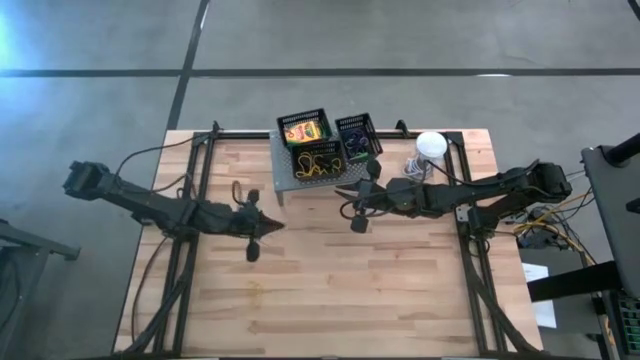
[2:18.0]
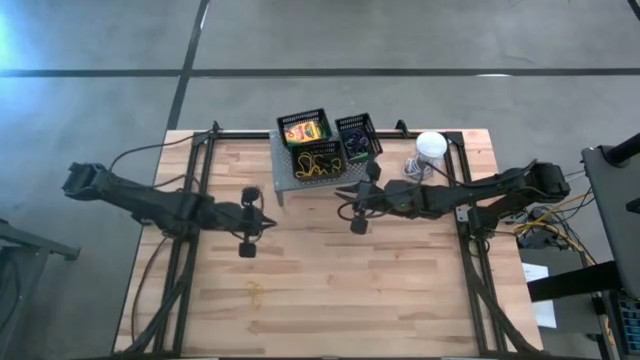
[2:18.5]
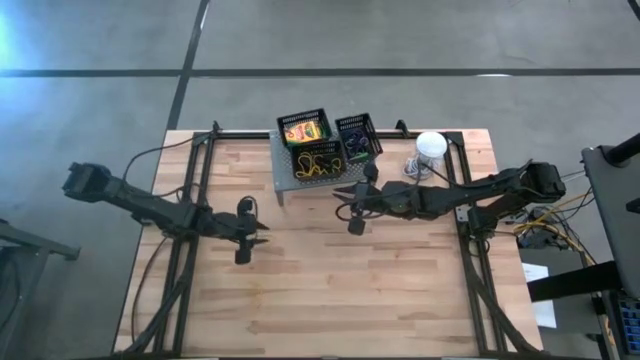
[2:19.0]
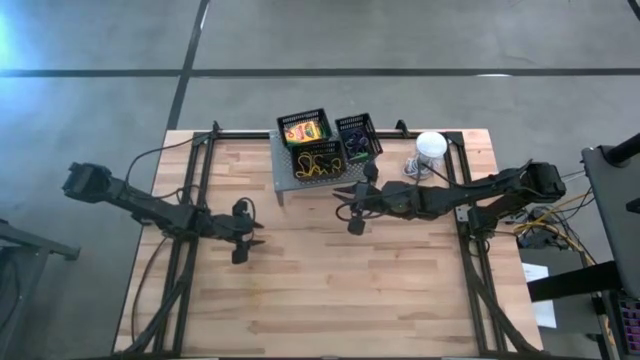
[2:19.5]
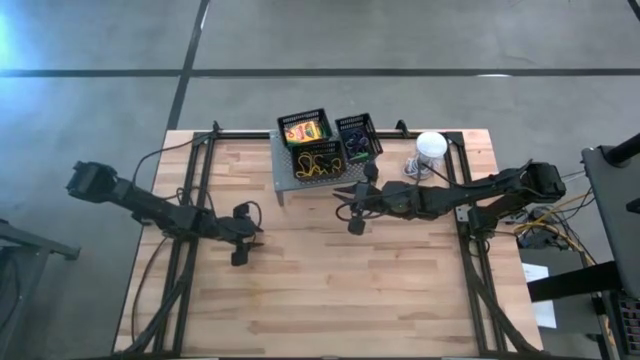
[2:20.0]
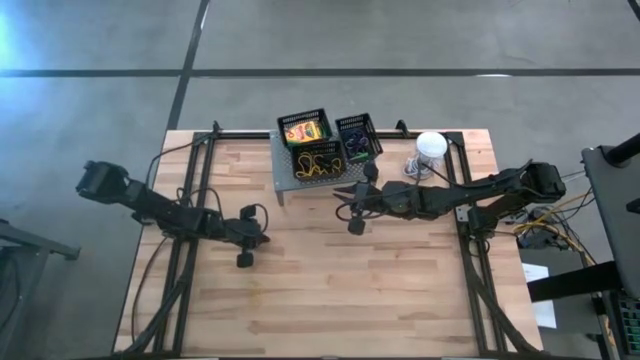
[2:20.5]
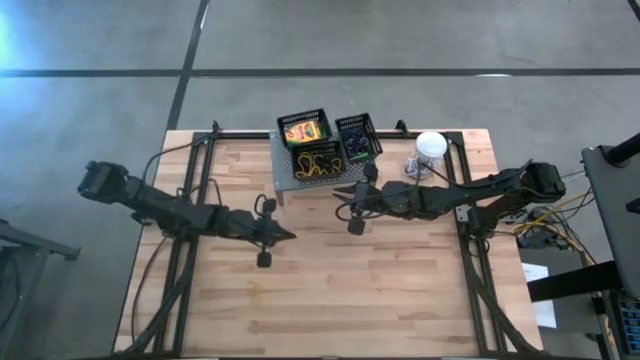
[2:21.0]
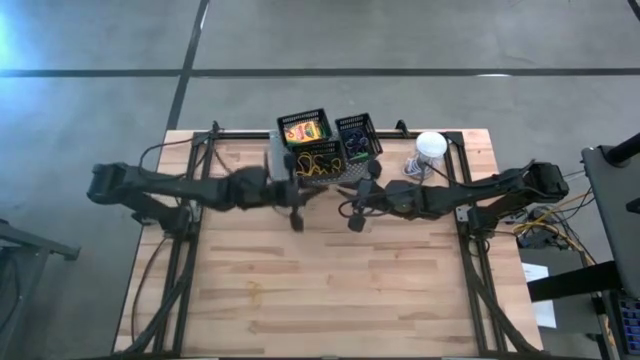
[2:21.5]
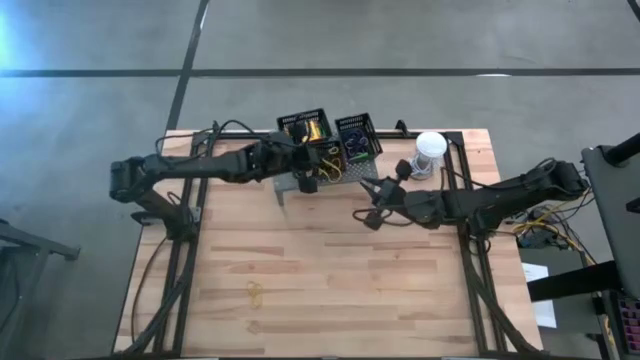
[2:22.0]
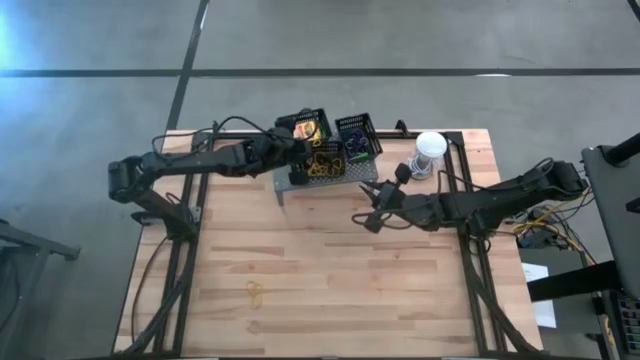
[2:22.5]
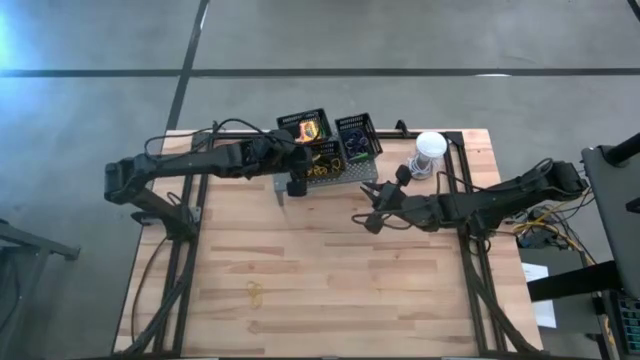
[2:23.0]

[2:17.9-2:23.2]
Task: Pick & Place Office Desk Supplies
Put the yellow rubber band into the bottom left black bin

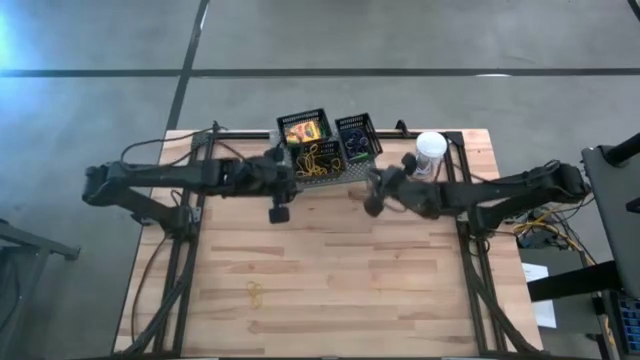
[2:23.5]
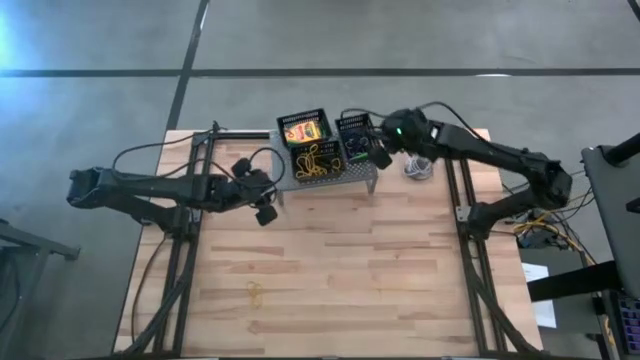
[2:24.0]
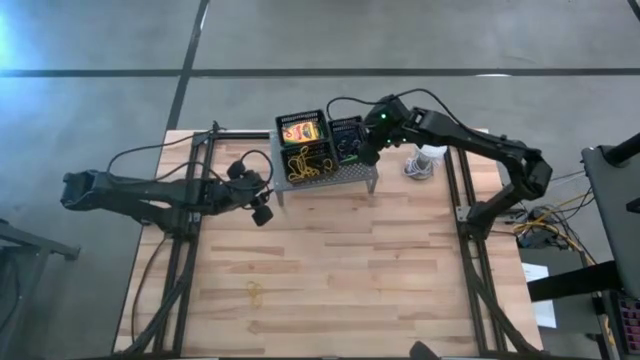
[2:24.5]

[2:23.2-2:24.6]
Adjust the black bins on the shelf

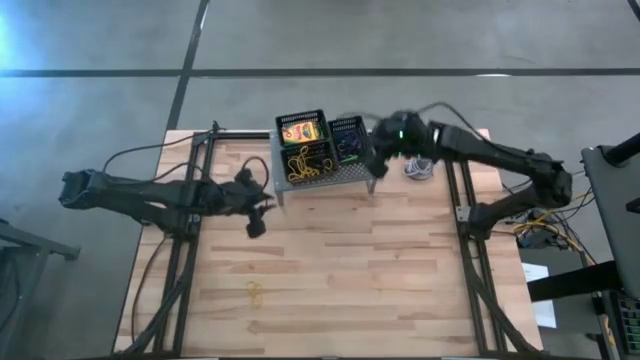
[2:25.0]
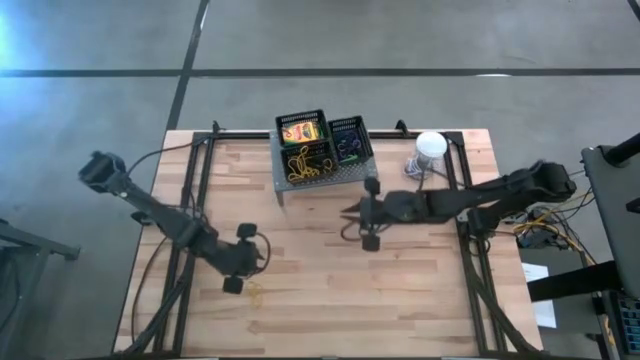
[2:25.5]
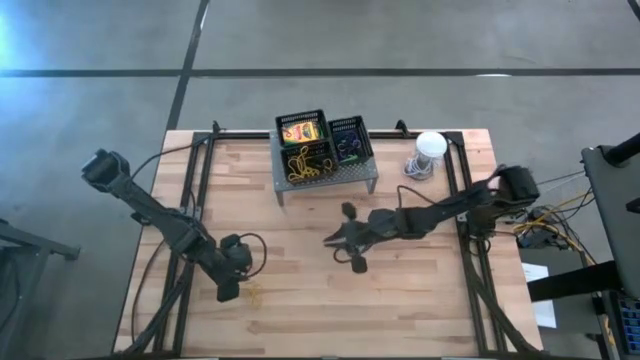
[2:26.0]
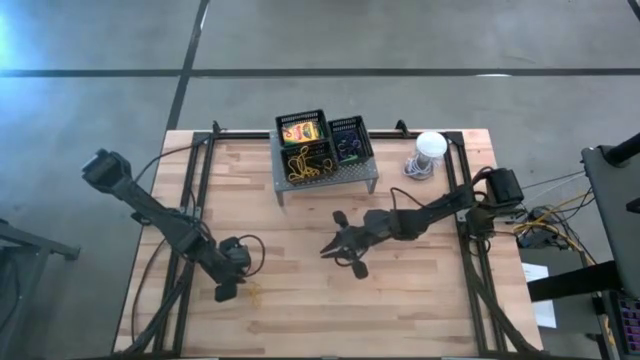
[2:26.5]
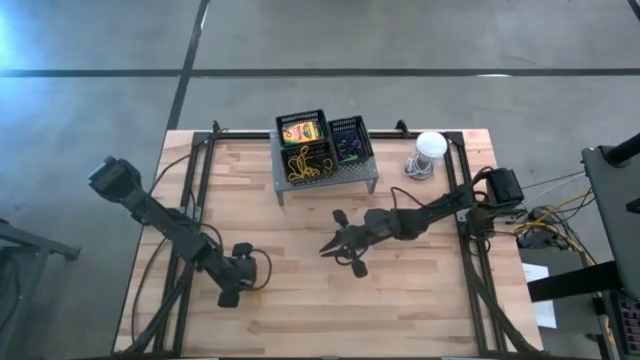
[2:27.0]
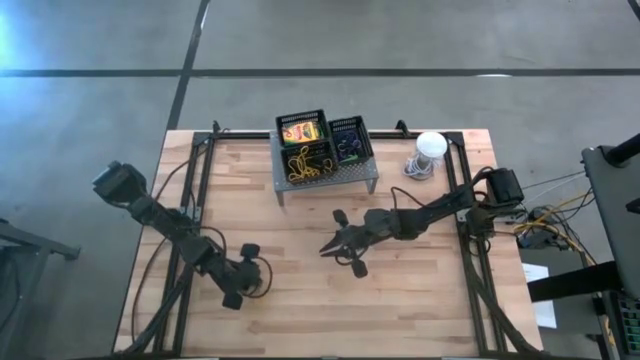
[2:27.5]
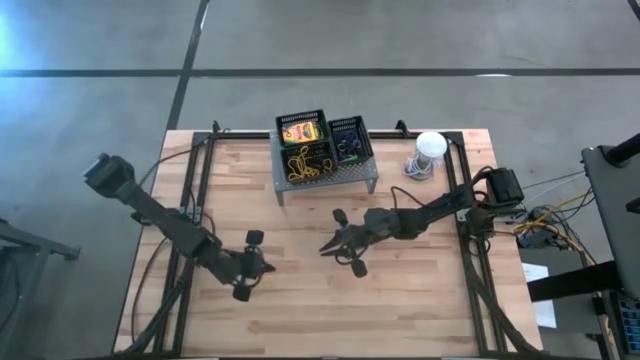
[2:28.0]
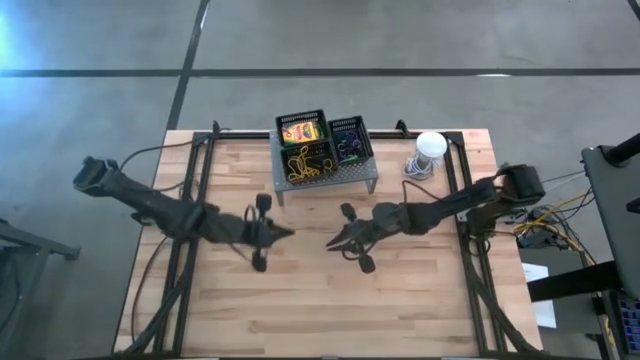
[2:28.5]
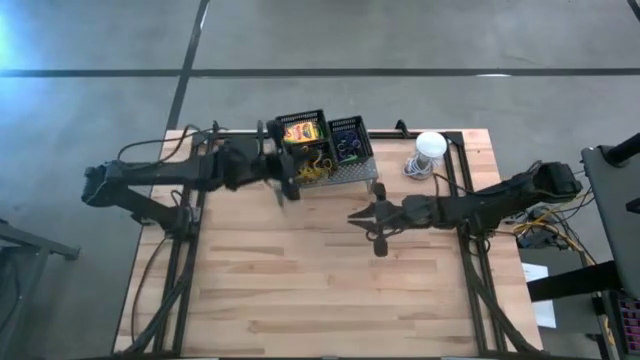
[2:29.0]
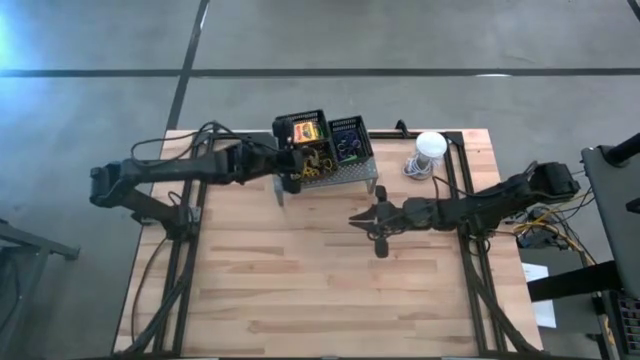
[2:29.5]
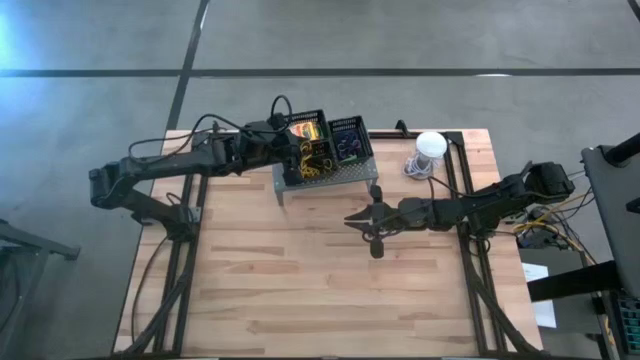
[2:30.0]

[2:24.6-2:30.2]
Put the yellow rubber band into the bottom left black bin

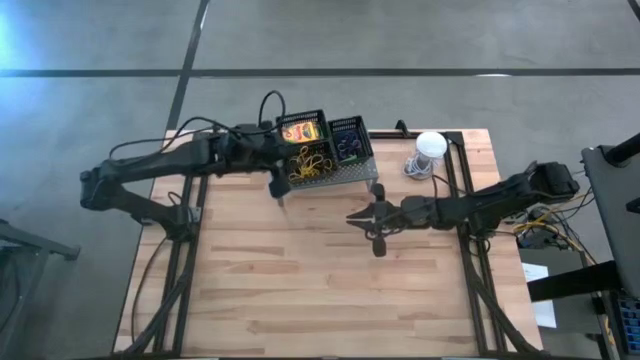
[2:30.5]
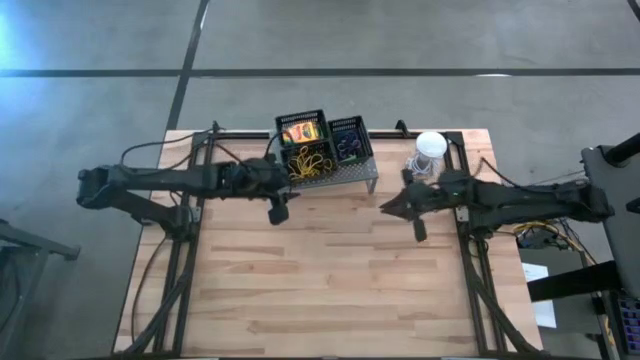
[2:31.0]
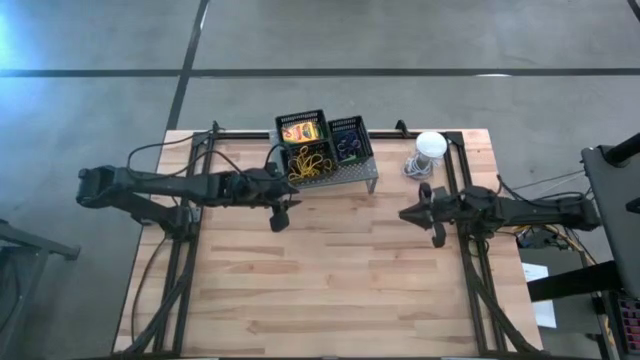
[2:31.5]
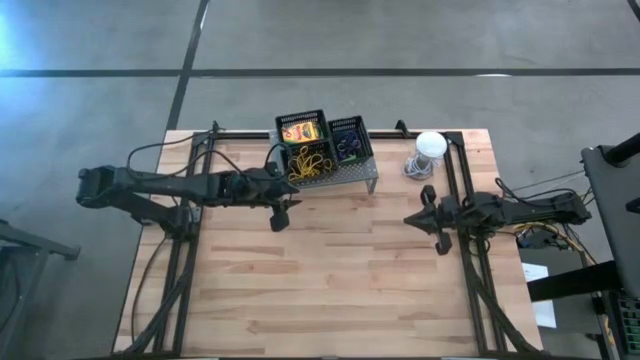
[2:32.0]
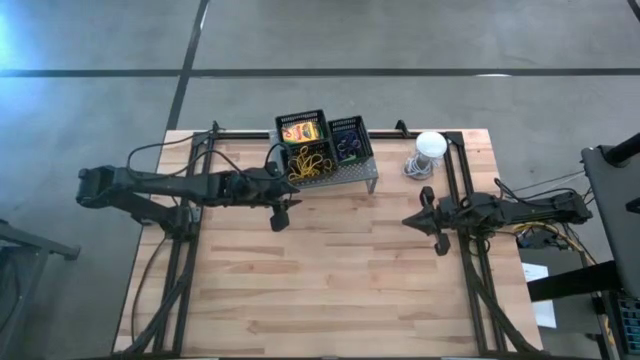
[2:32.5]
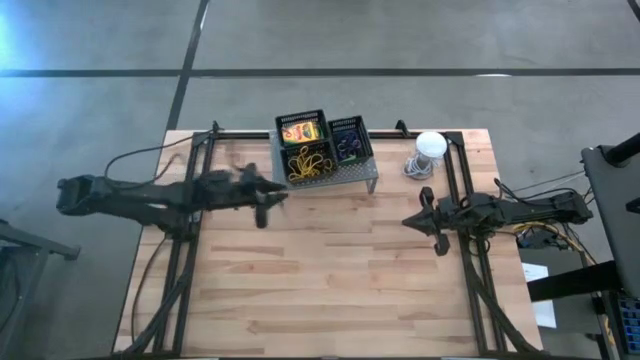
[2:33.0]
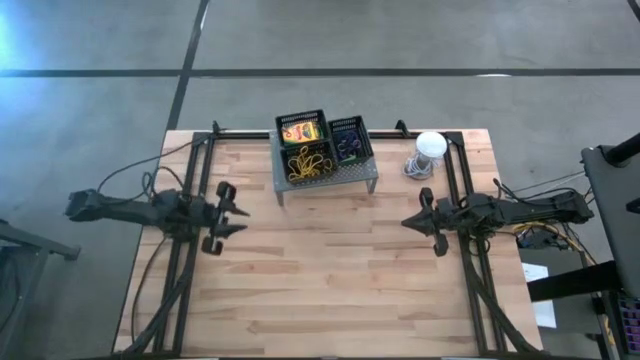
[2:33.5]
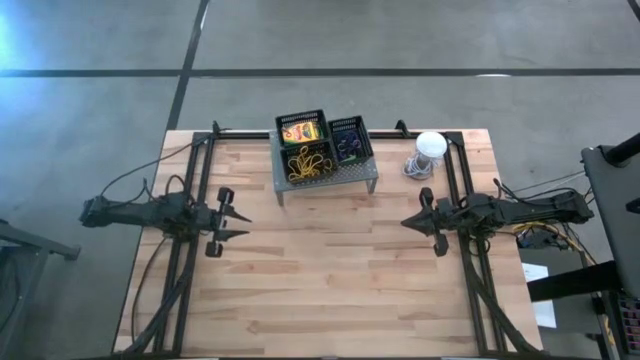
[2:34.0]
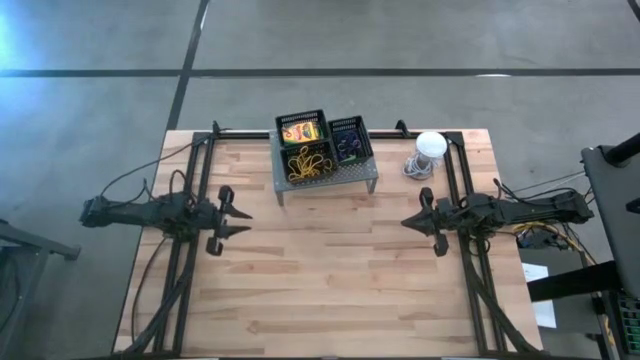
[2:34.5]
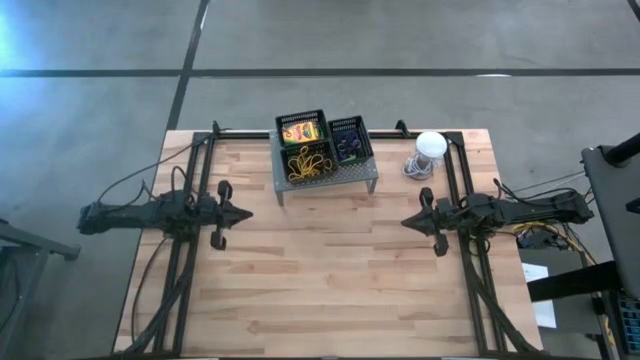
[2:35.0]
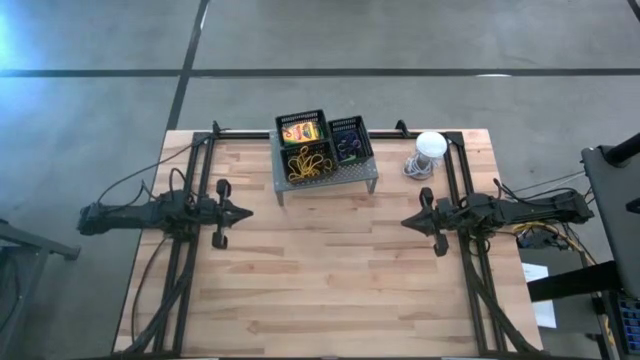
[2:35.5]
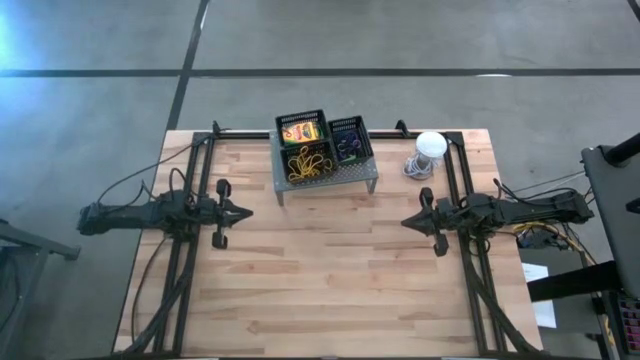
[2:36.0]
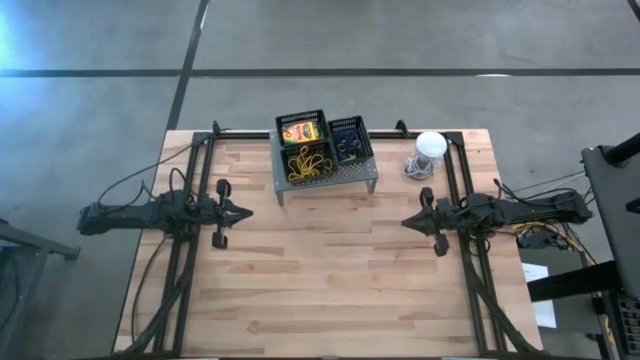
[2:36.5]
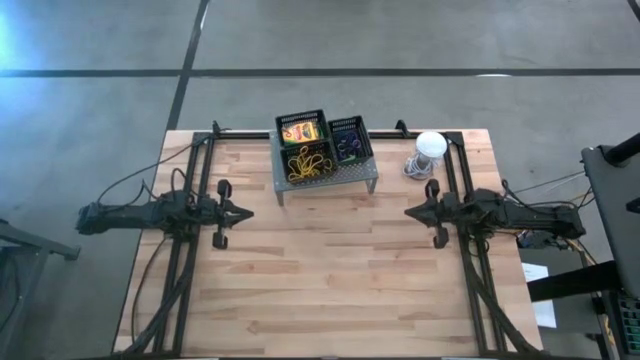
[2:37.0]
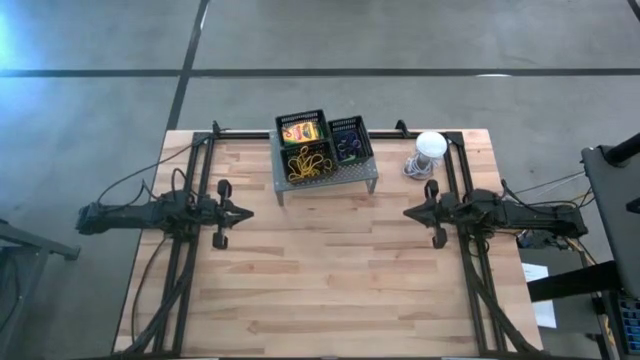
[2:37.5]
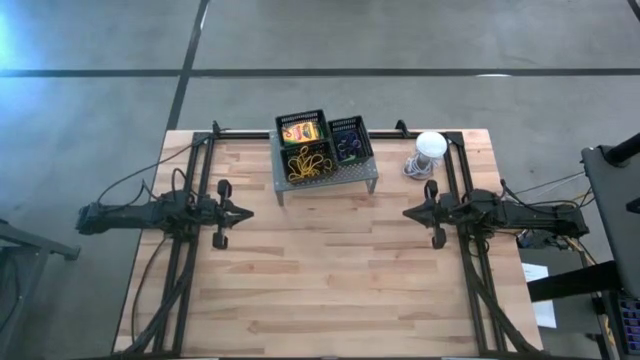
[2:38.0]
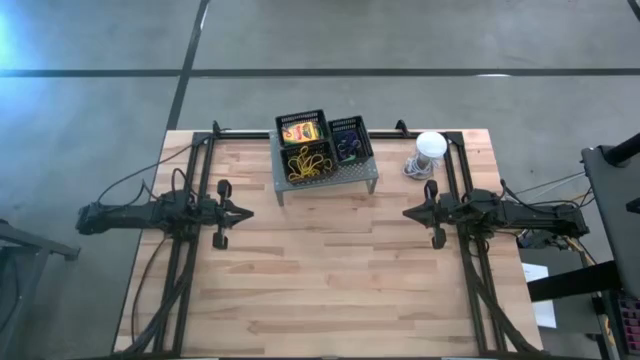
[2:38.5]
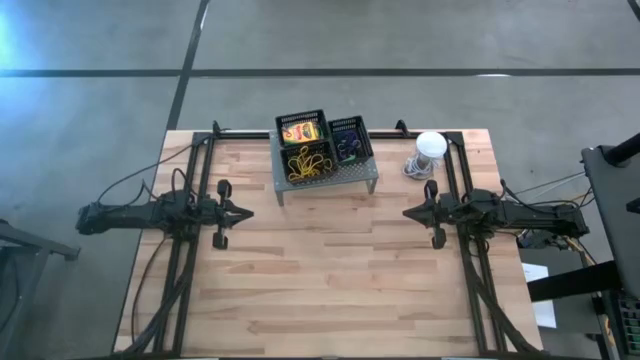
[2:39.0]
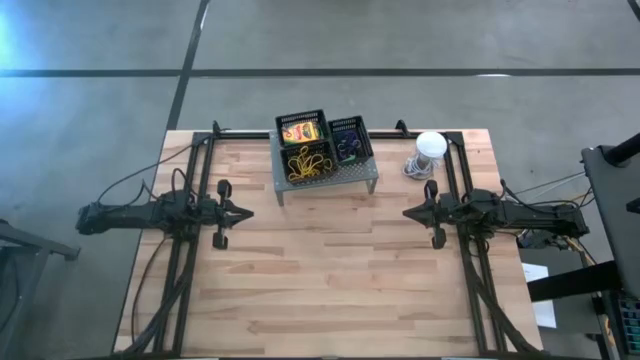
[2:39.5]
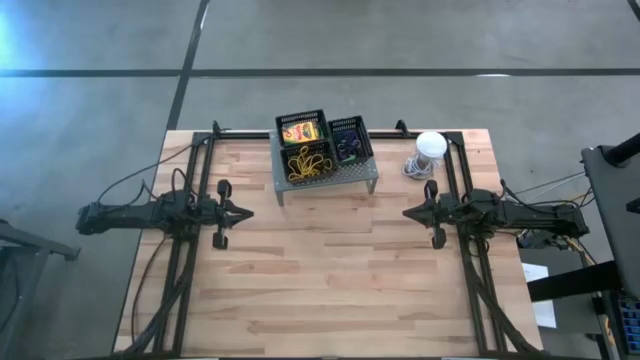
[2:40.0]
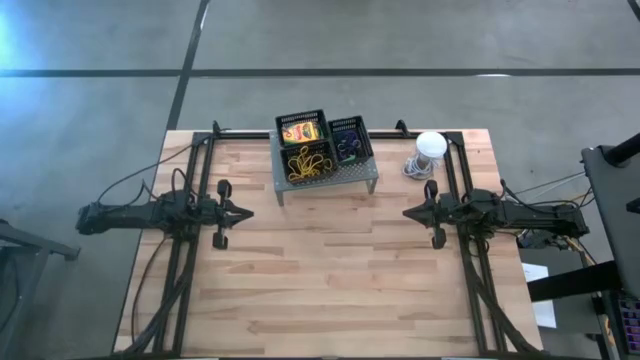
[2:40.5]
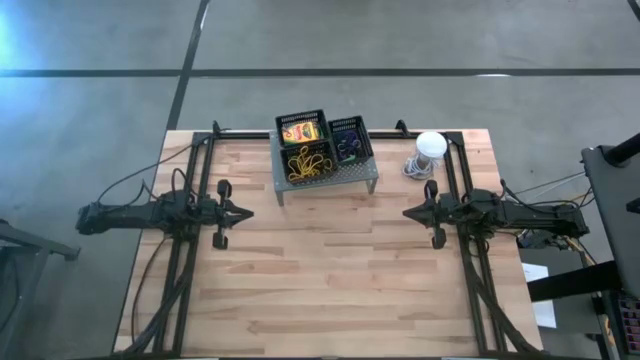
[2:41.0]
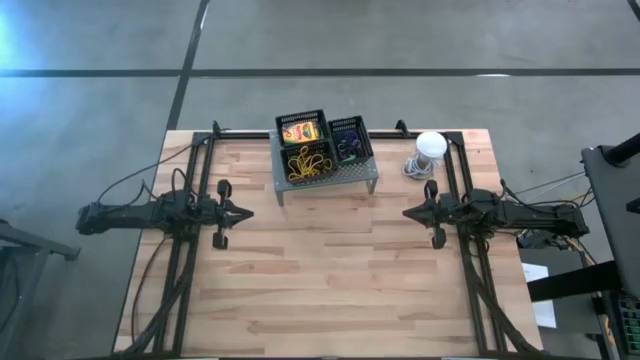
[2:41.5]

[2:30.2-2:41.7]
Return to Home Position
